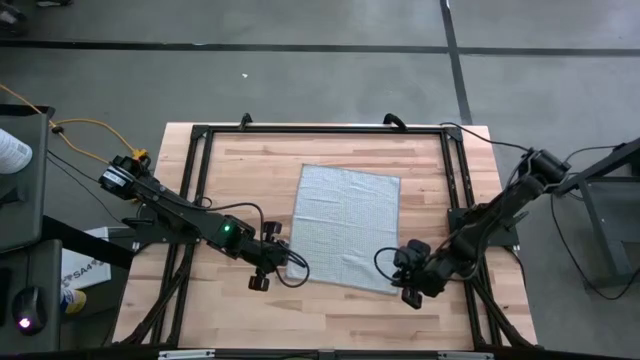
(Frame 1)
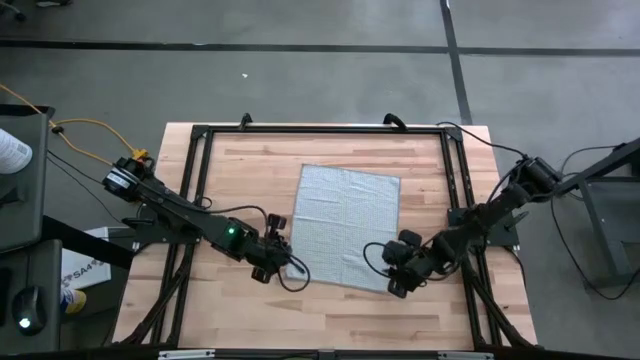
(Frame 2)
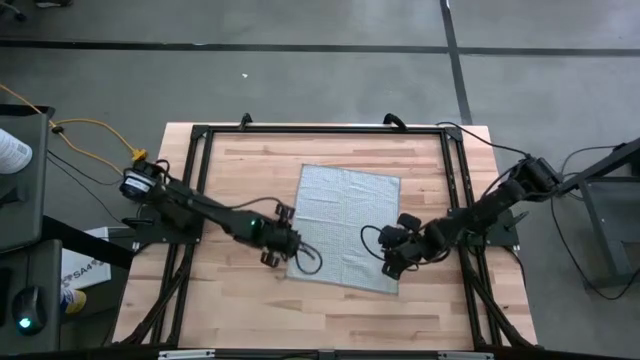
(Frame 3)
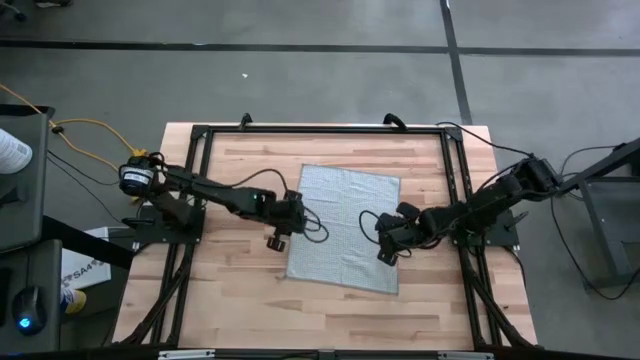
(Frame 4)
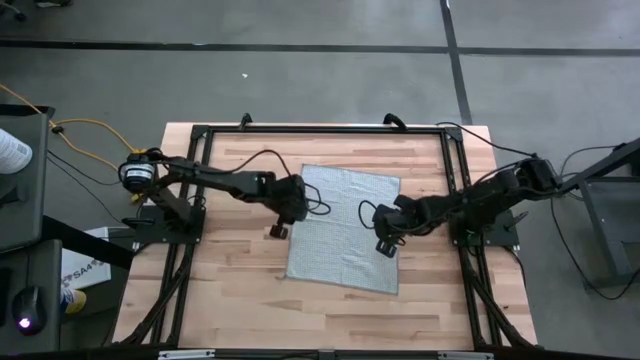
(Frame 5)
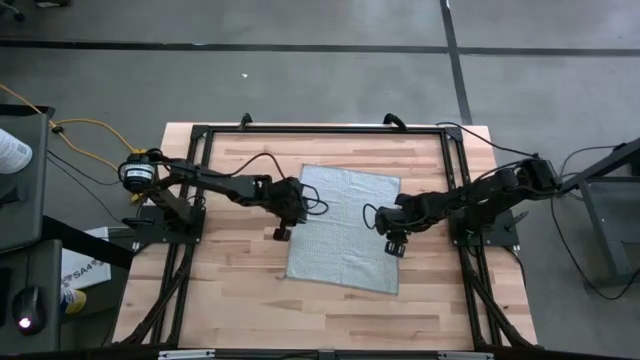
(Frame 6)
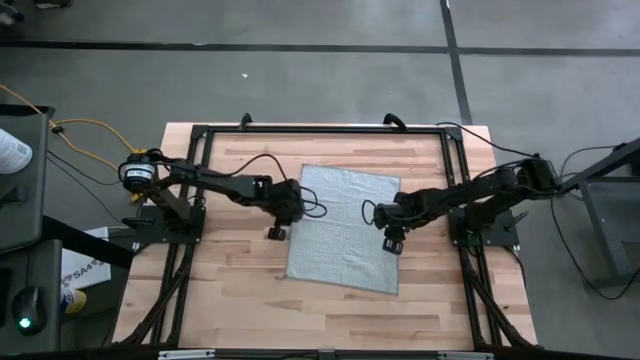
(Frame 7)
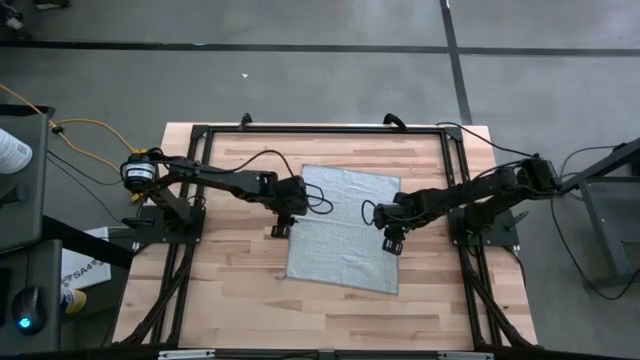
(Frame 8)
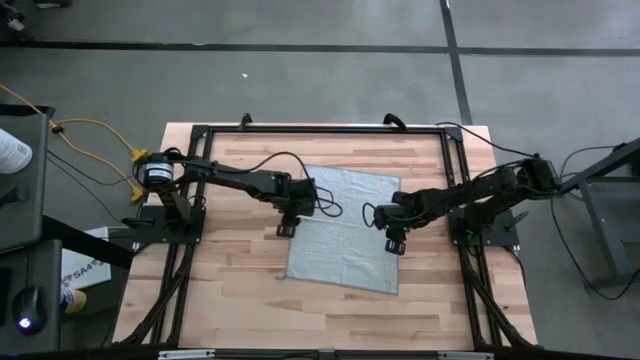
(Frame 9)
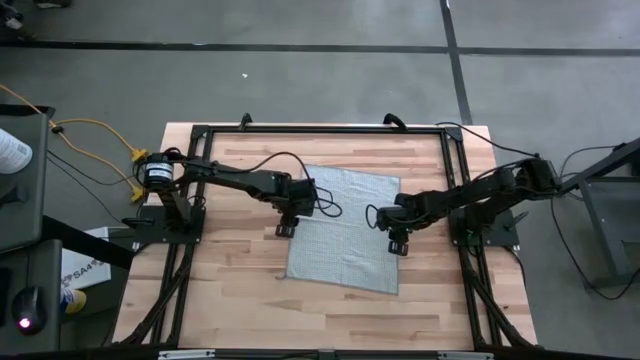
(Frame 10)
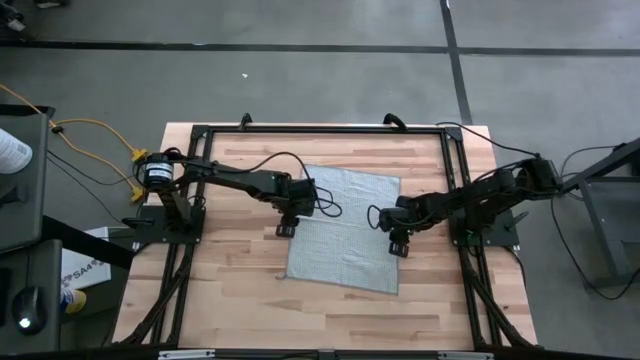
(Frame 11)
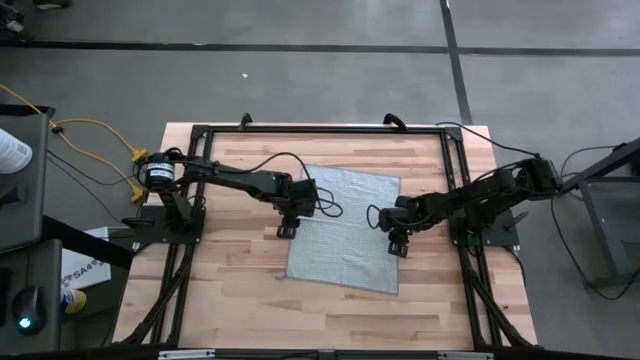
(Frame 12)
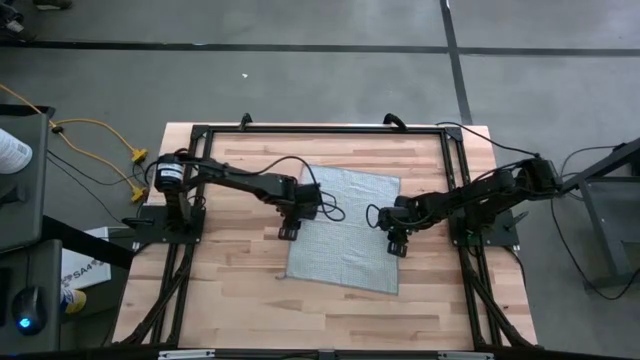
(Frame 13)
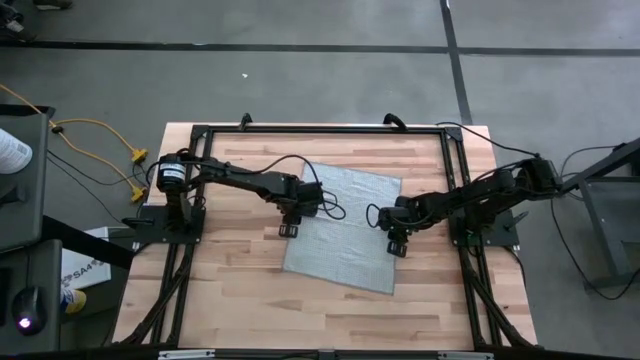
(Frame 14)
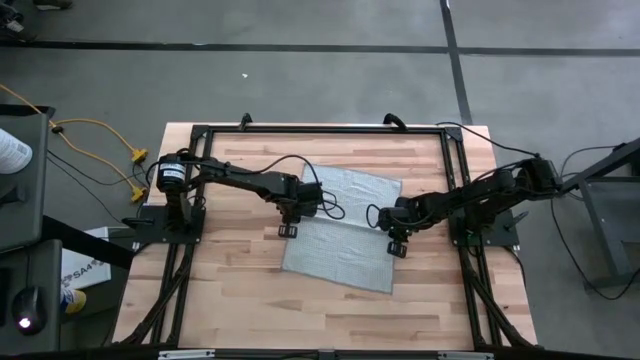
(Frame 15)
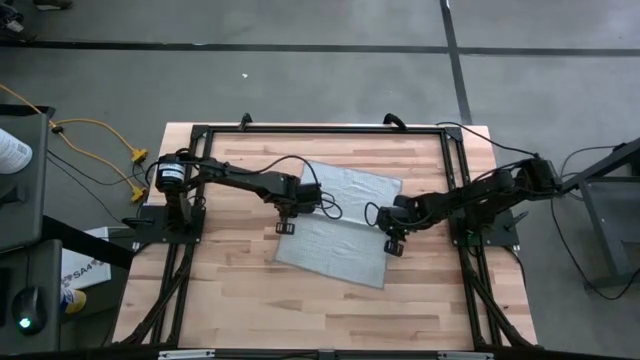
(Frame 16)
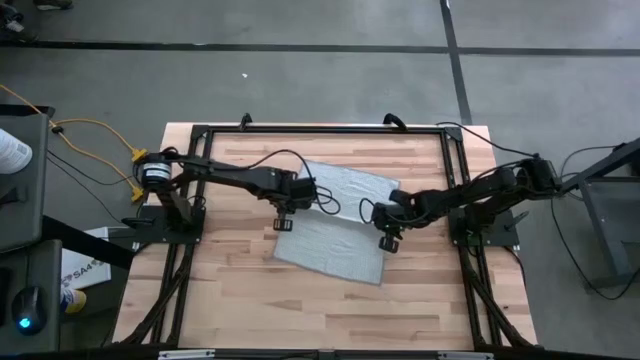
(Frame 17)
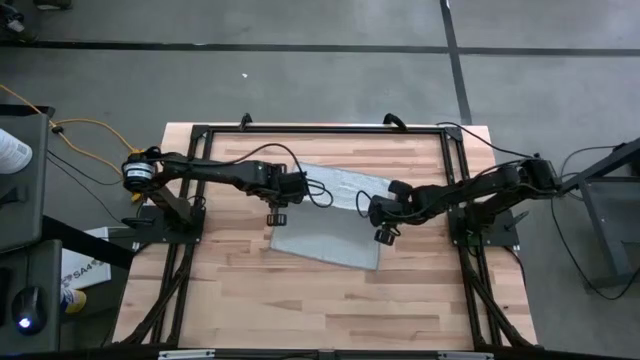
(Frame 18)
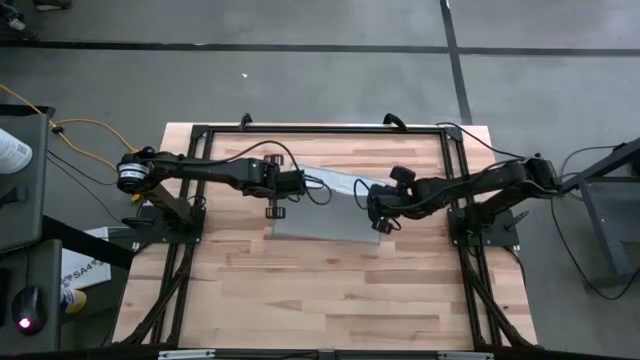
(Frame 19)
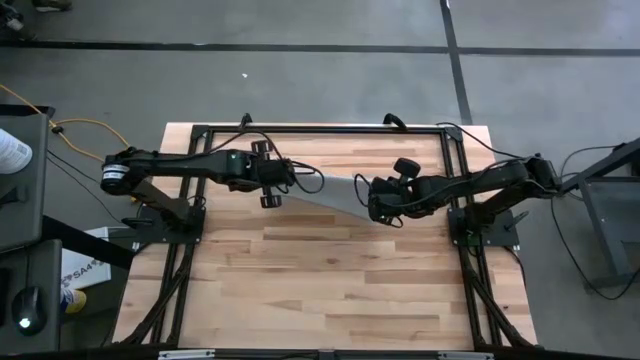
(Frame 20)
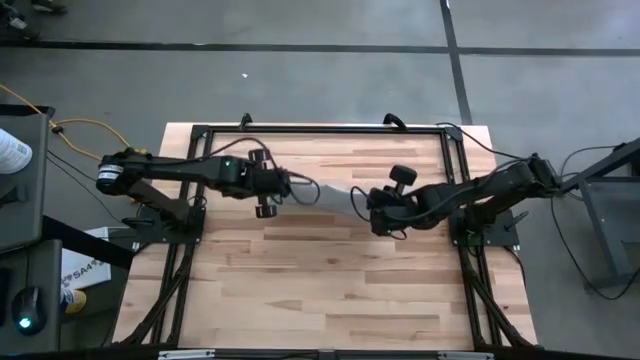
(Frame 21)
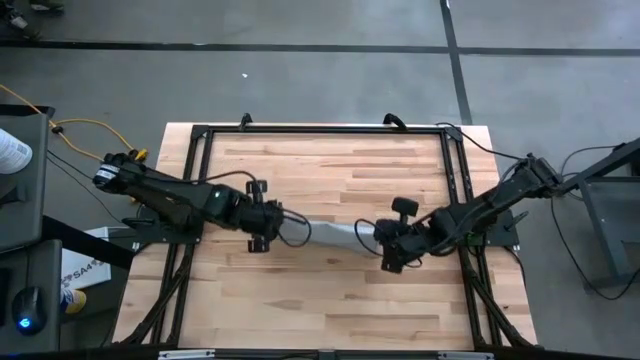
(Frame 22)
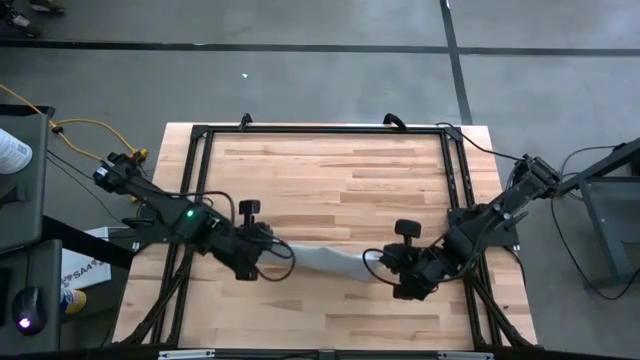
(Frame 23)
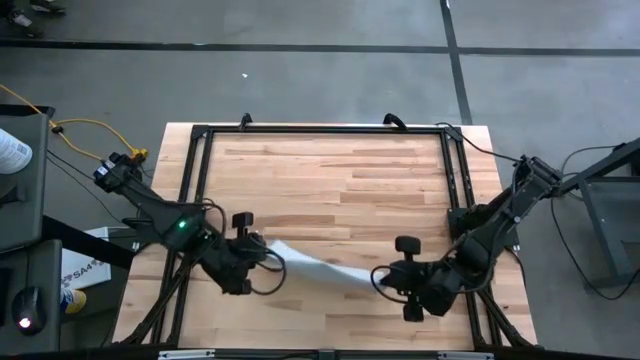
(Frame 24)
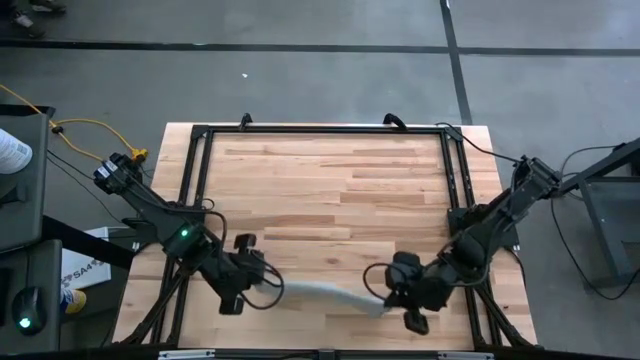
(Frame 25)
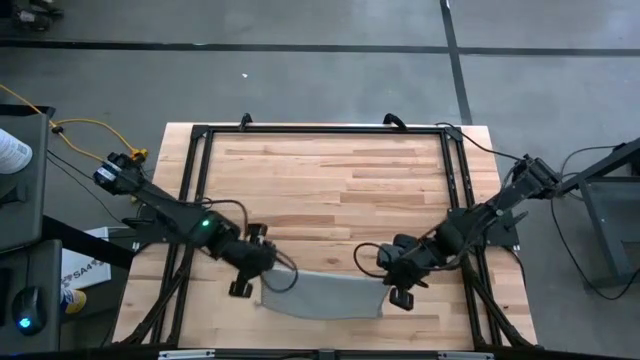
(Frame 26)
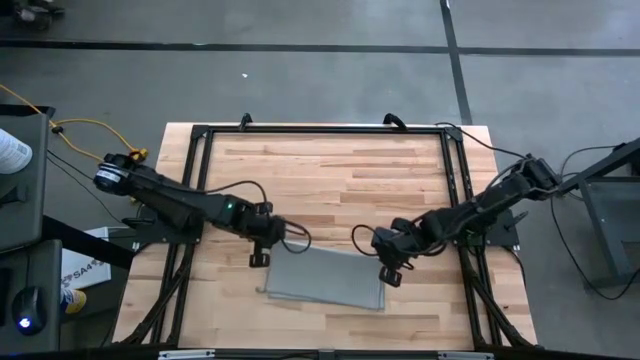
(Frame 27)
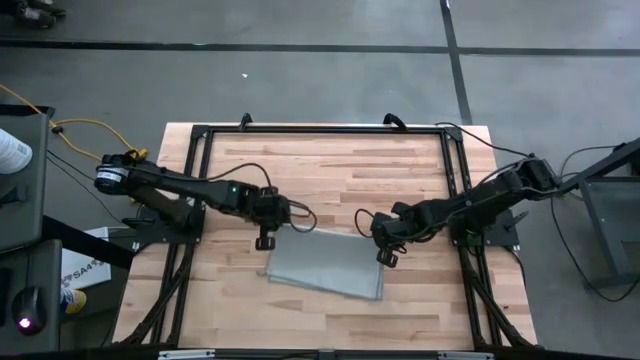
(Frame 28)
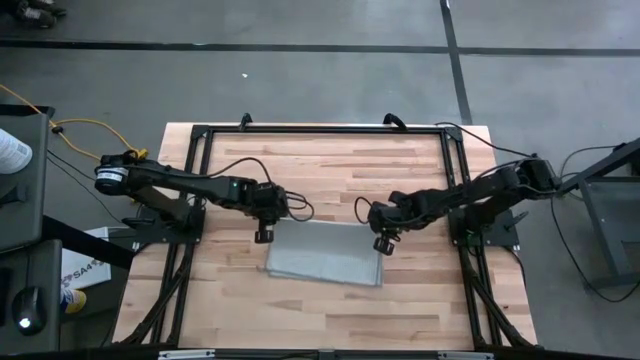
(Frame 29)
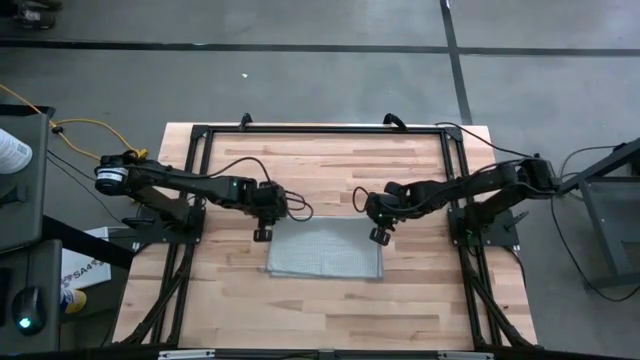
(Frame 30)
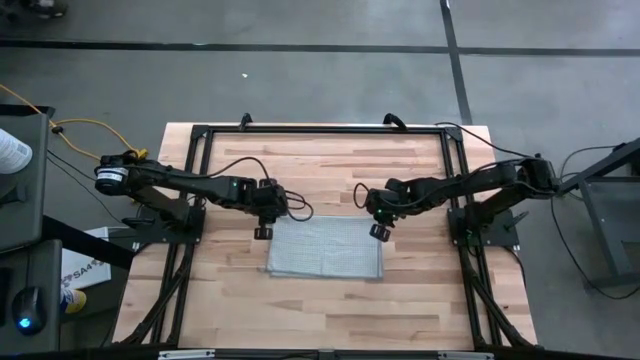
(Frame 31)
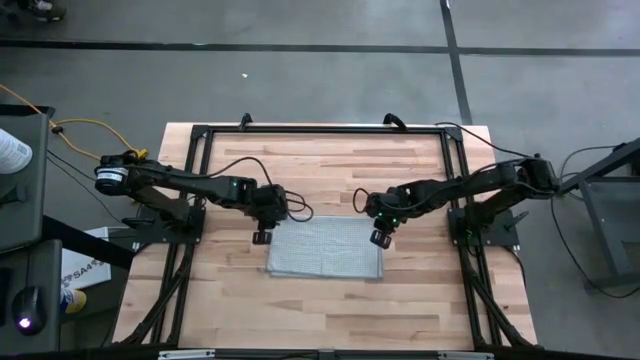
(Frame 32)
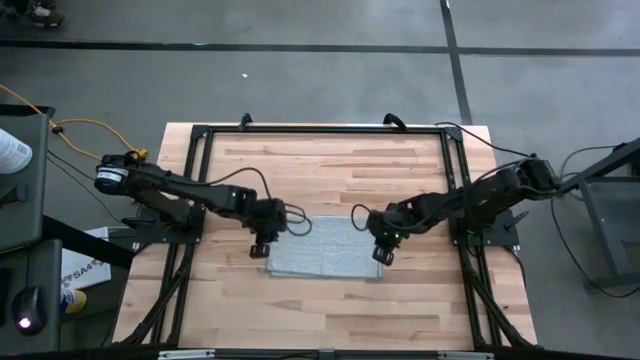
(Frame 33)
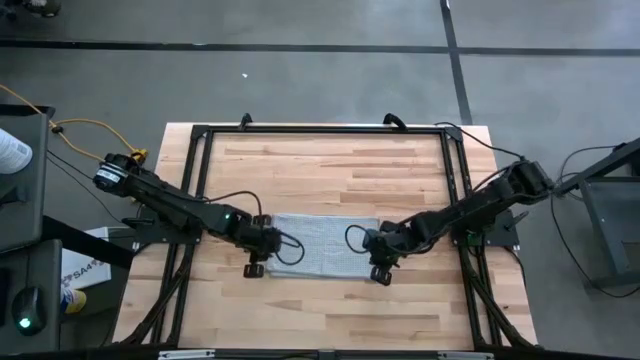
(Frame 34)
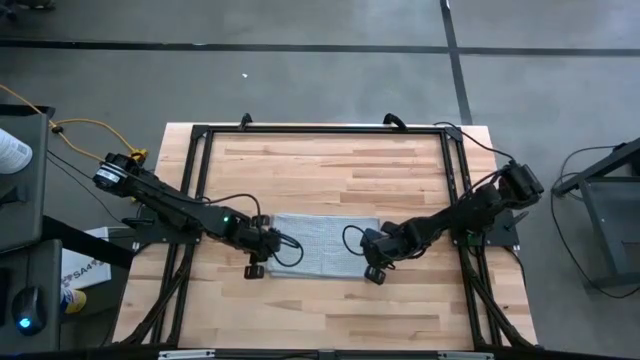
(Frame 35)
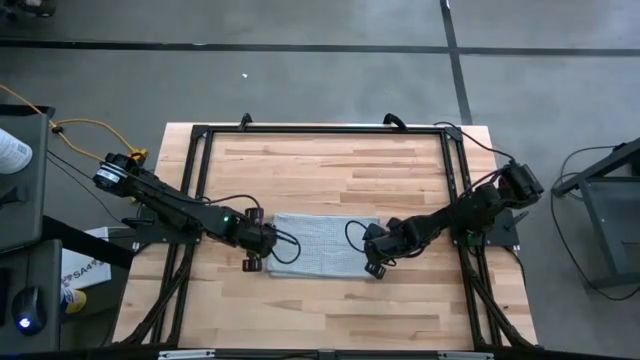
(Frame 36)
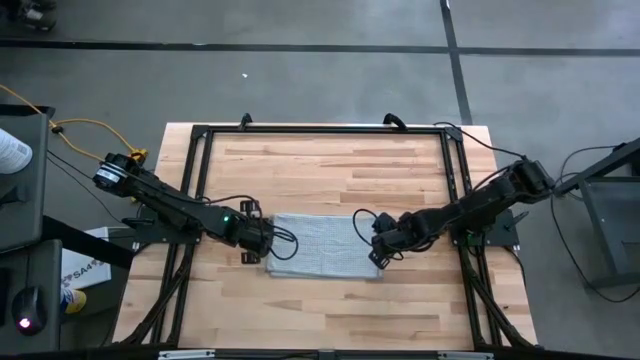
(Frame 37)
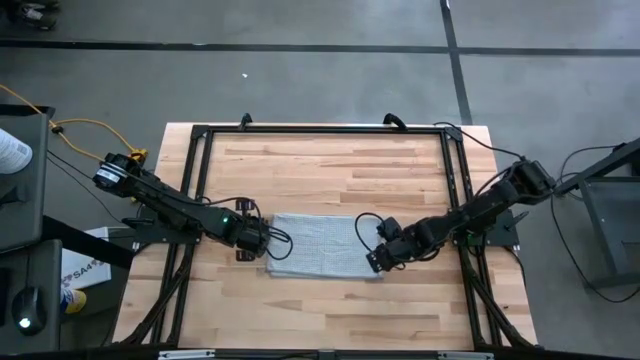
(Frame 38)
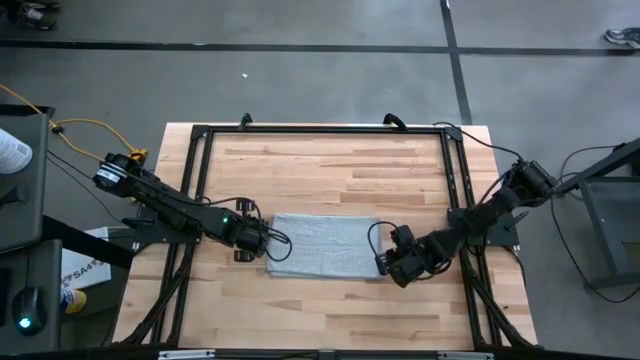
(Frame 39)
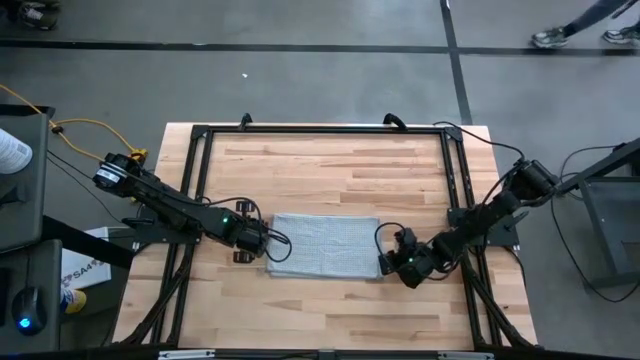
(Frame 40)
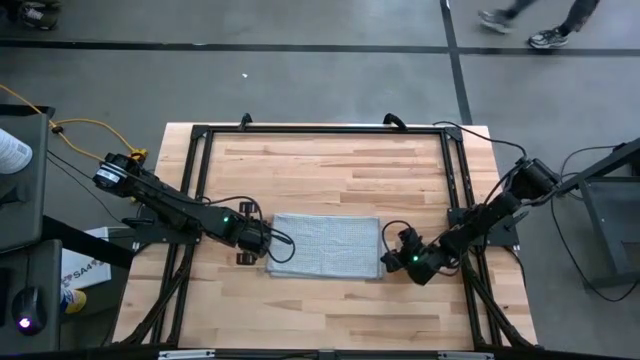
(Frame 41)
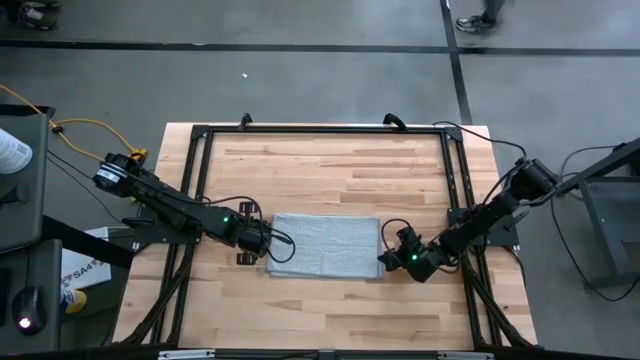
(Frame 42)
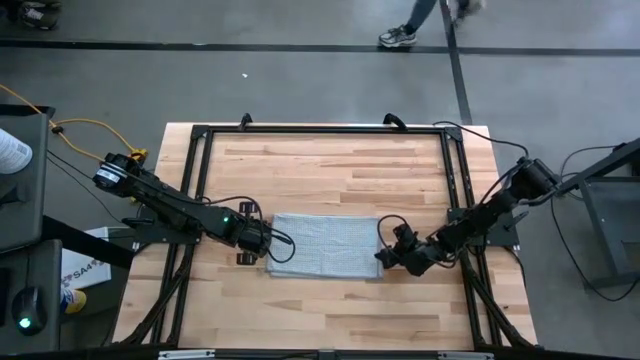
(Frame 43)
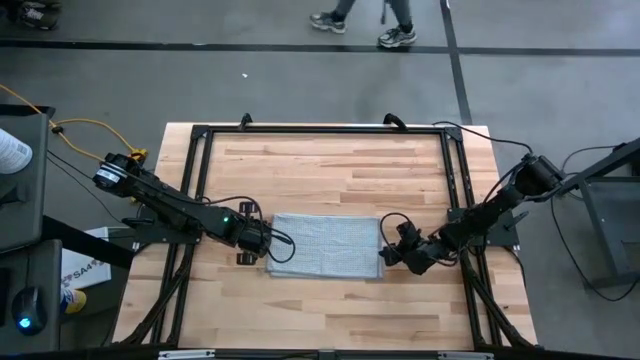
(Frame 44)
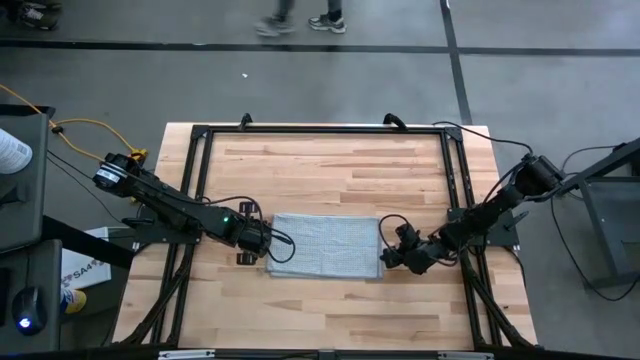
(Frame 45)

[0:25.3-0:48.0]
Task: Fold microfiber towels
Fold the gray towel on the table
